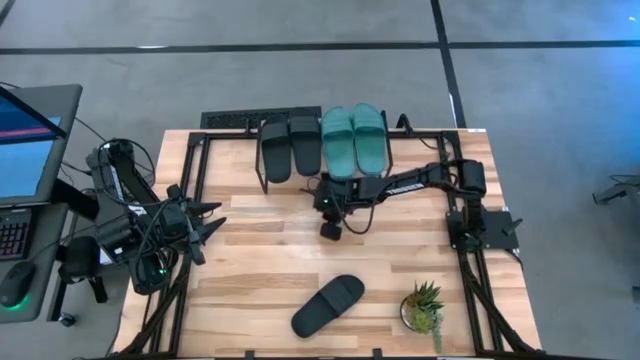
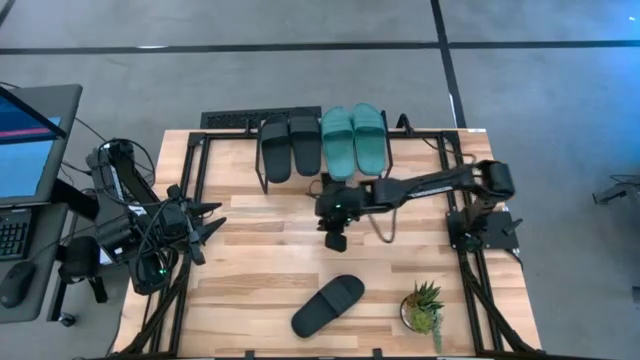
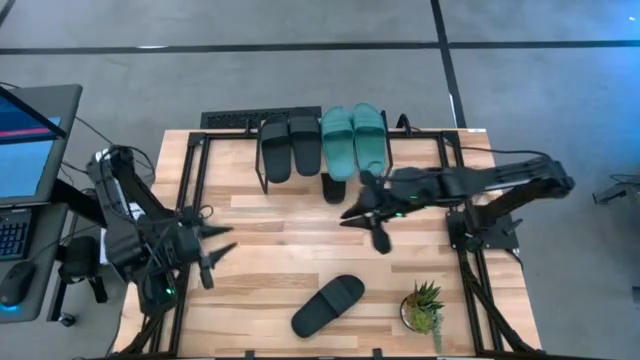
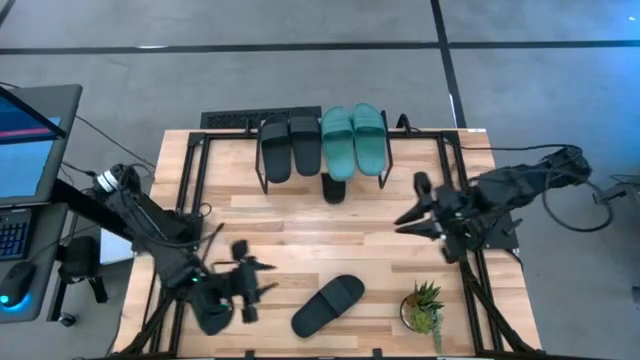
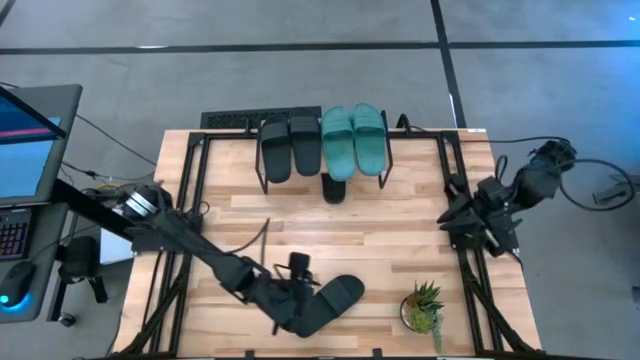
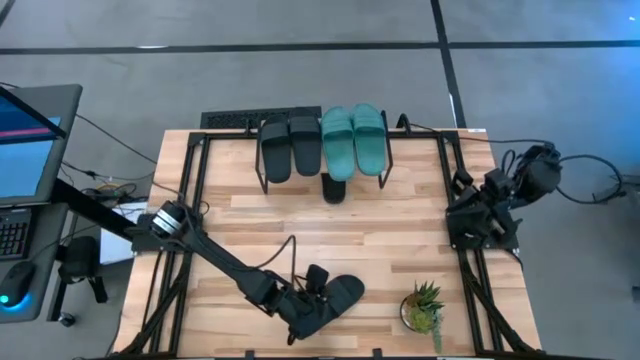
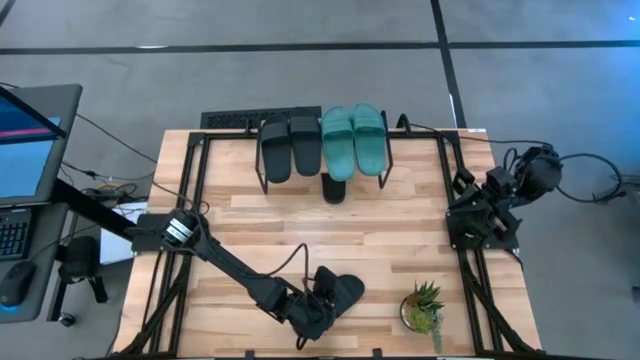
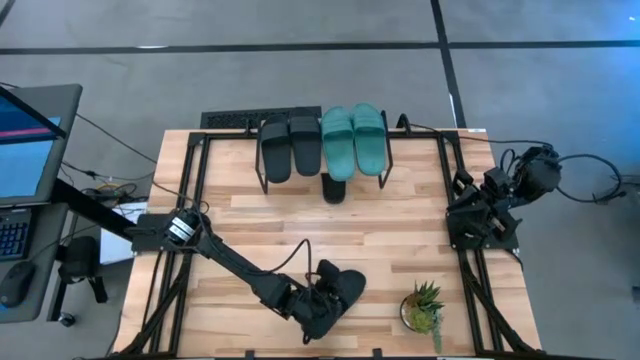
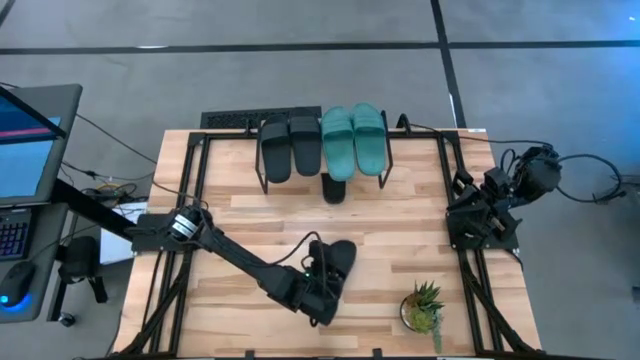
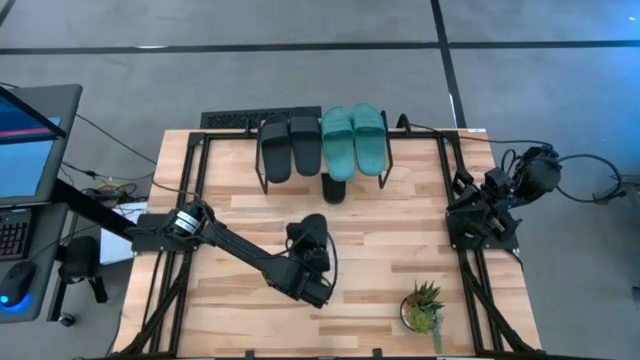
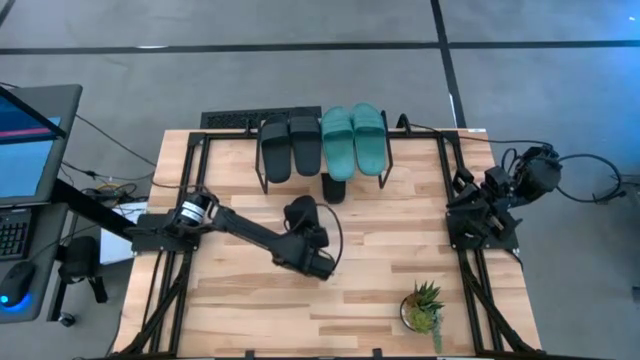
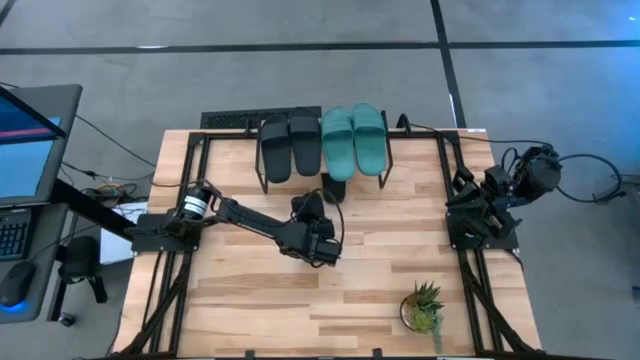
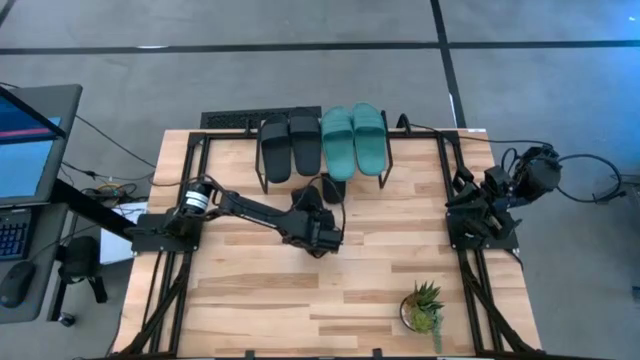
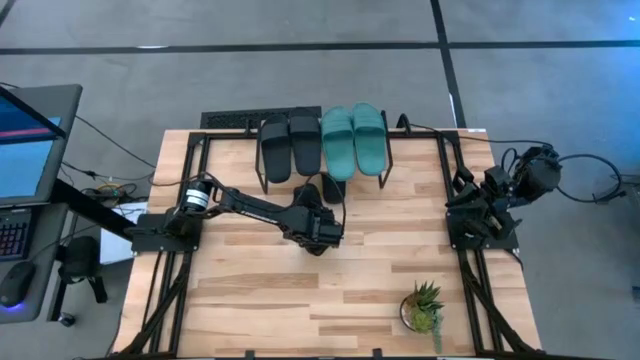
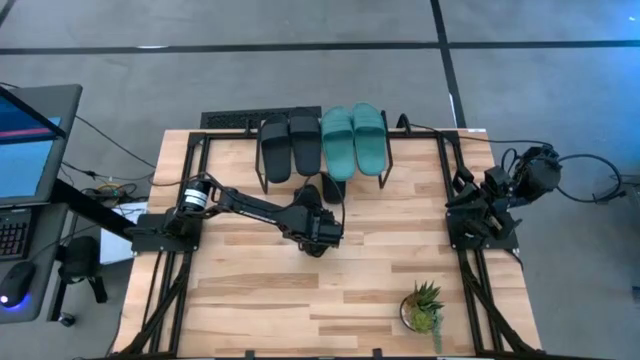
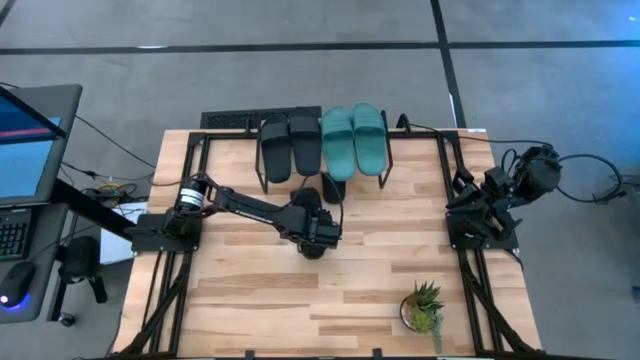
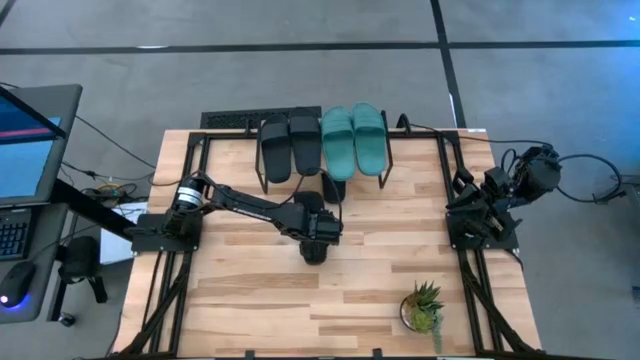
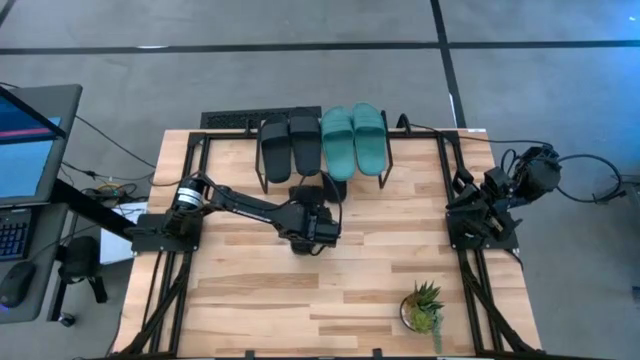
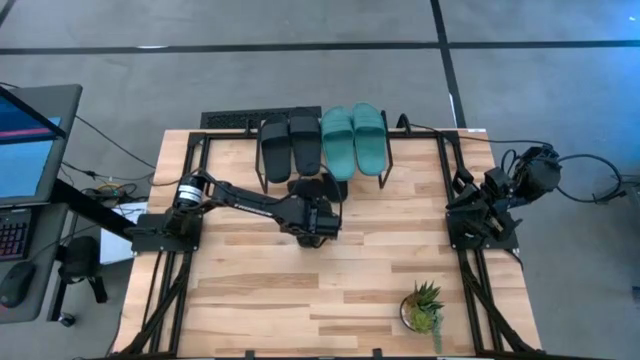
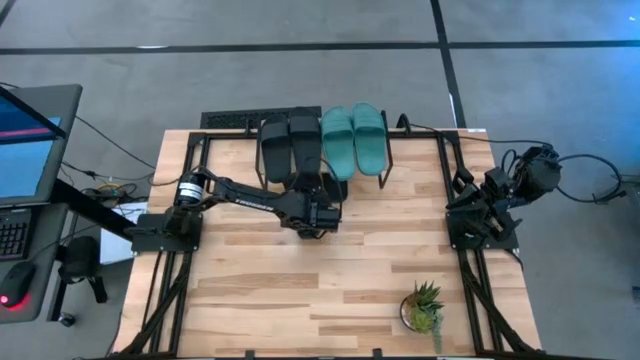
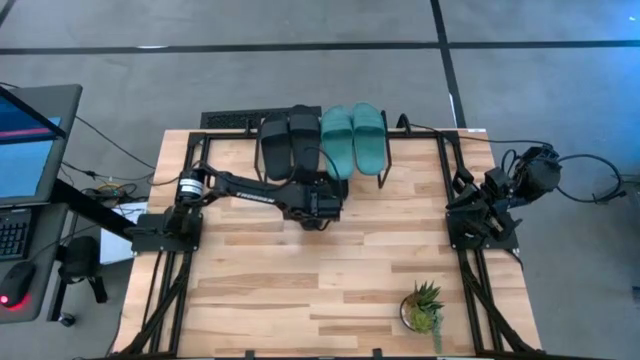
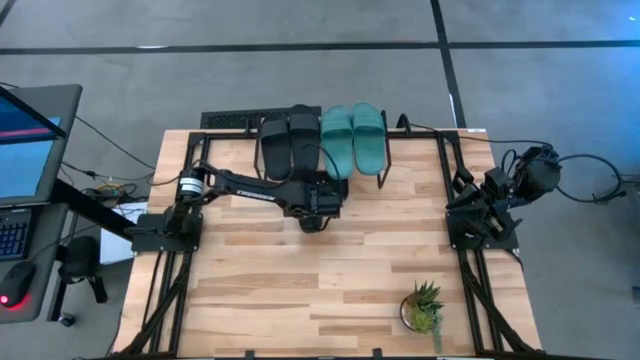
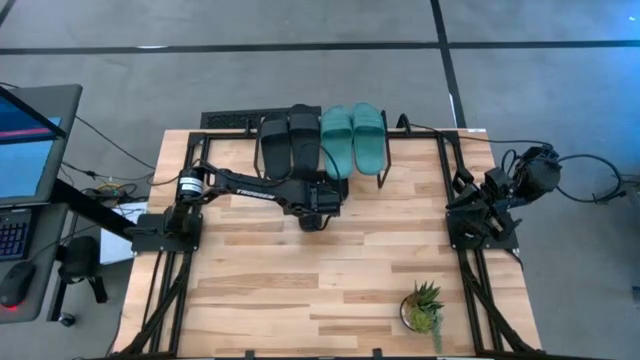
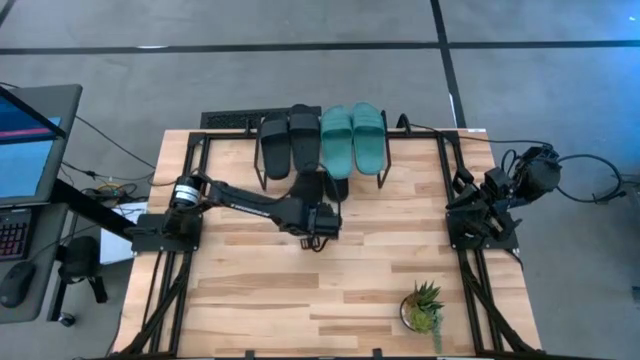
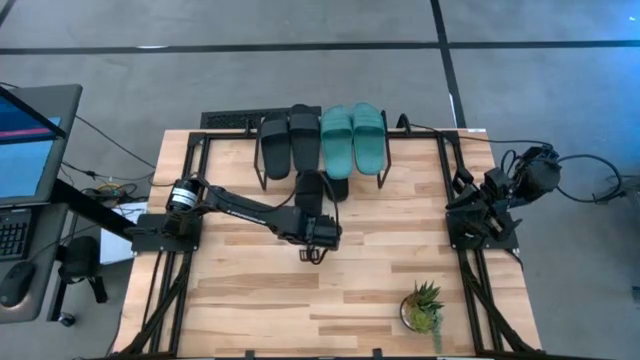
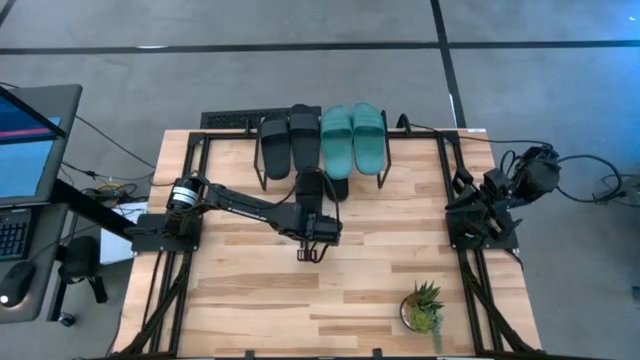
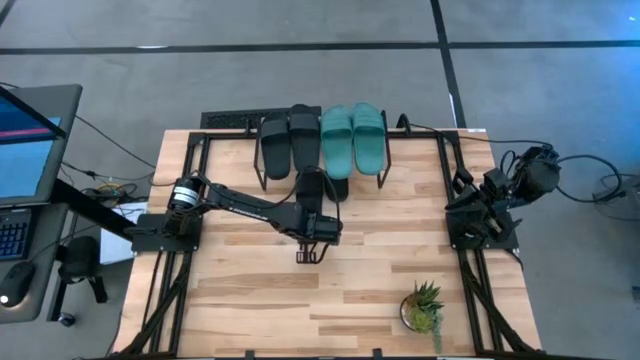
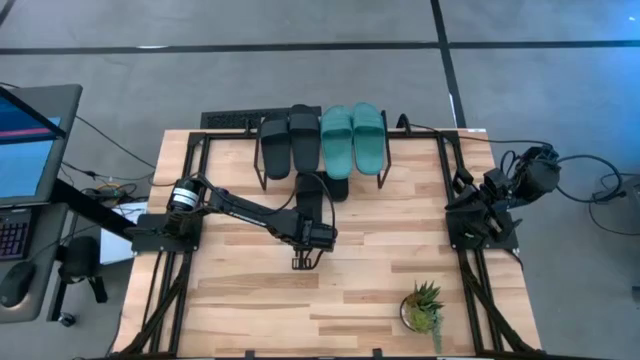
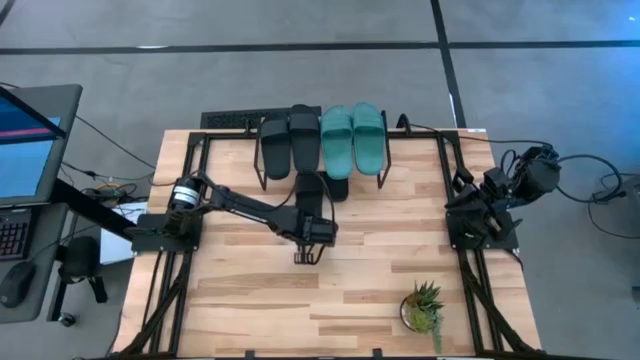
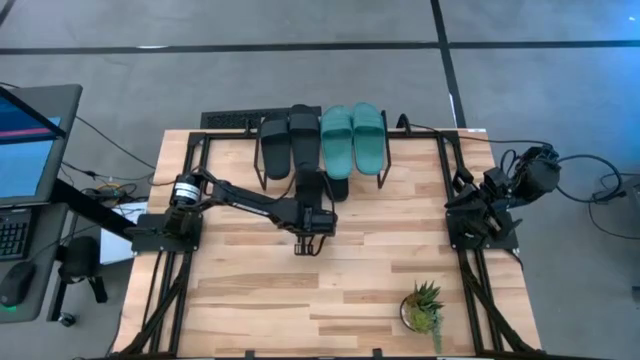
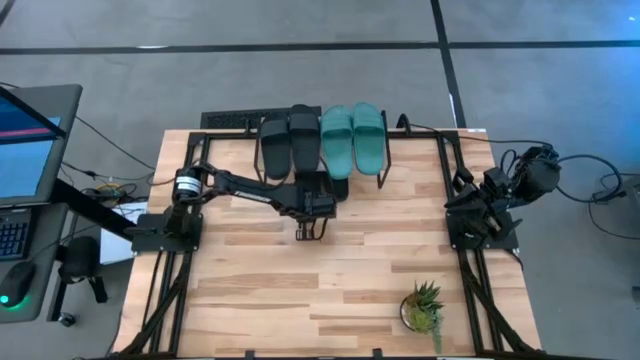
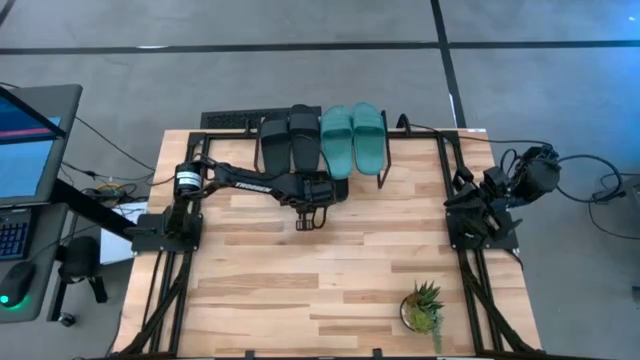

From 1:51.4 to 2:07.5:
Task: Pick and place slides into the shelf
Put the black slipper under the shelf

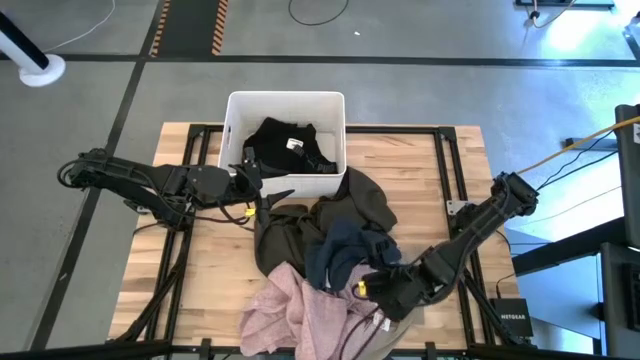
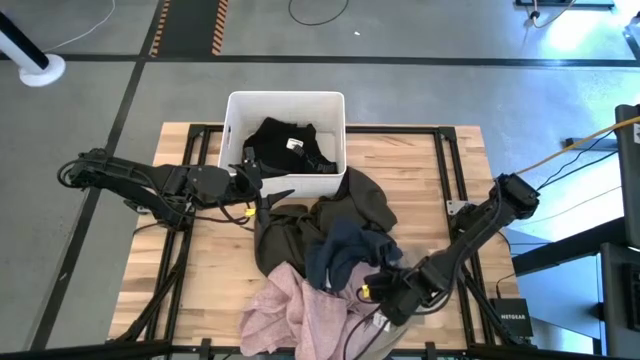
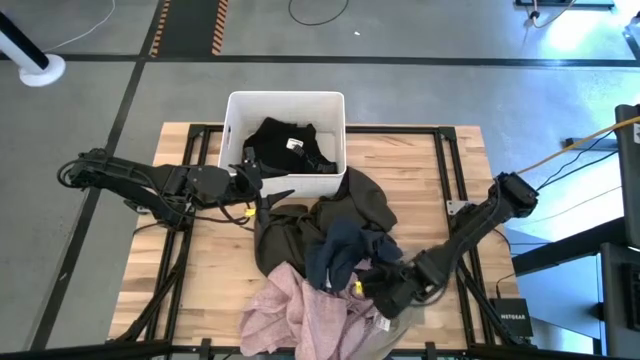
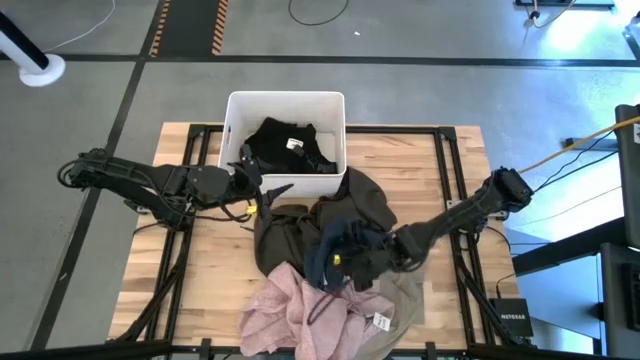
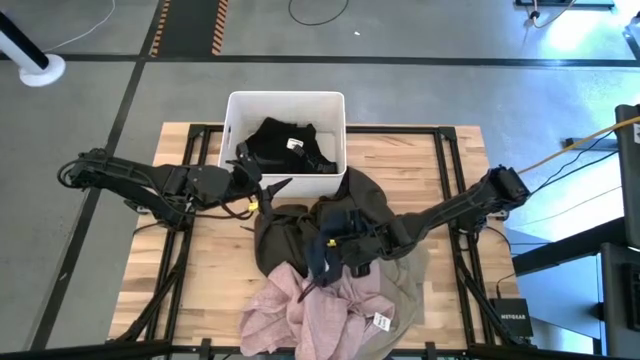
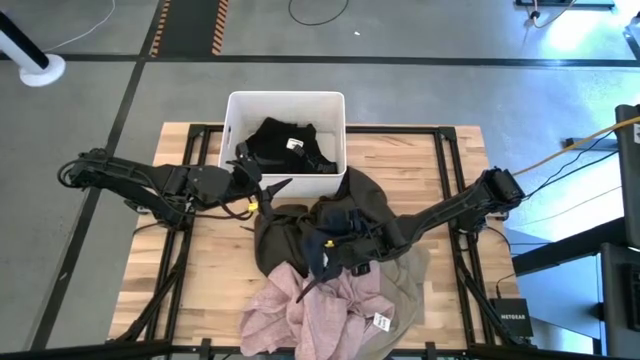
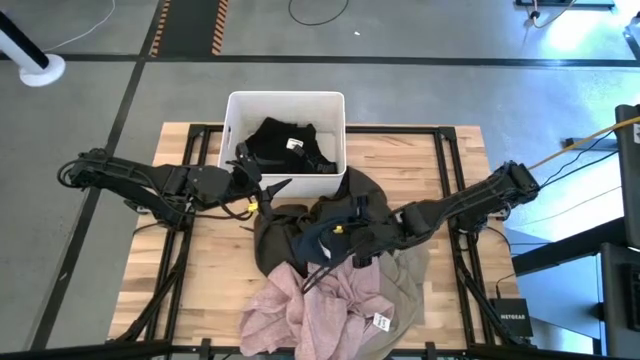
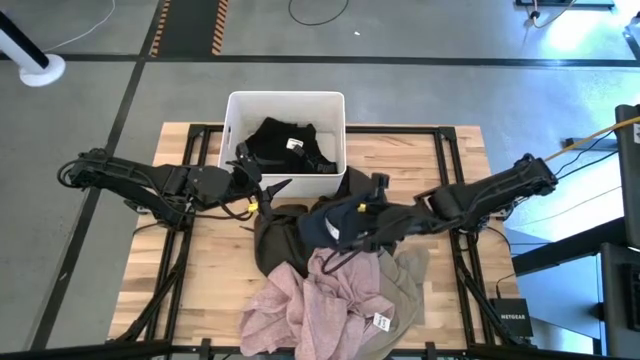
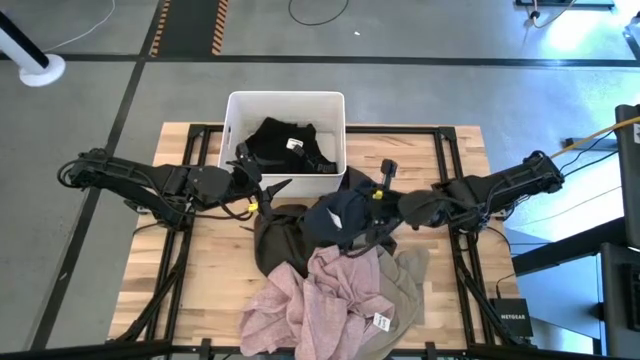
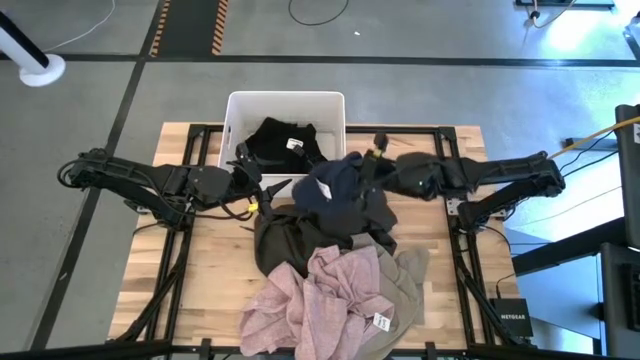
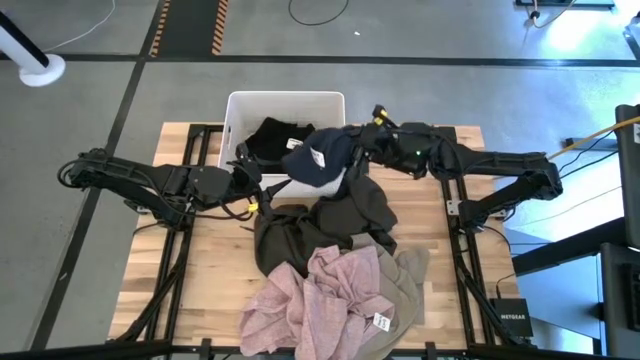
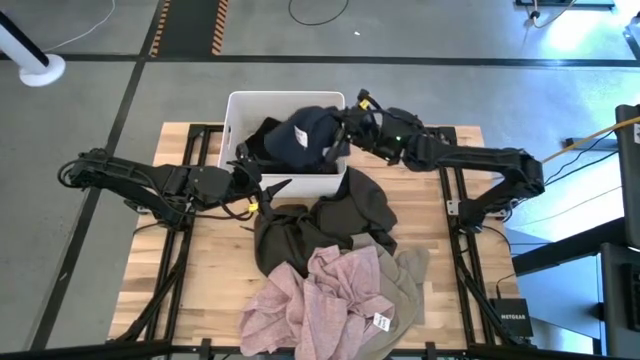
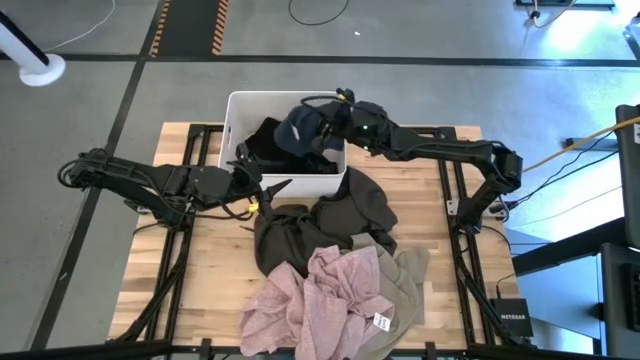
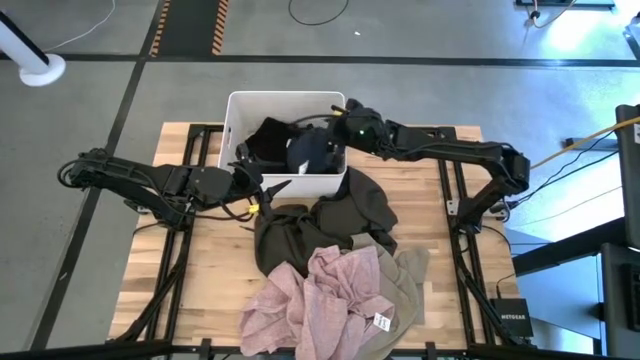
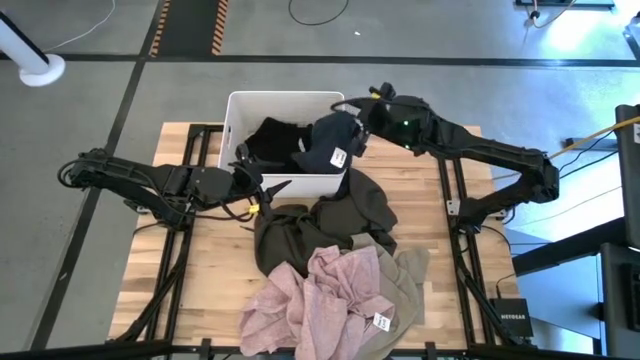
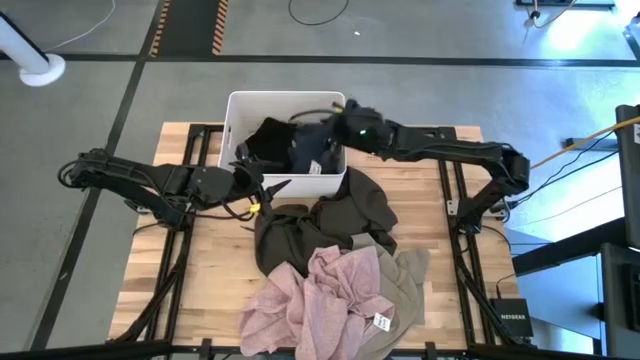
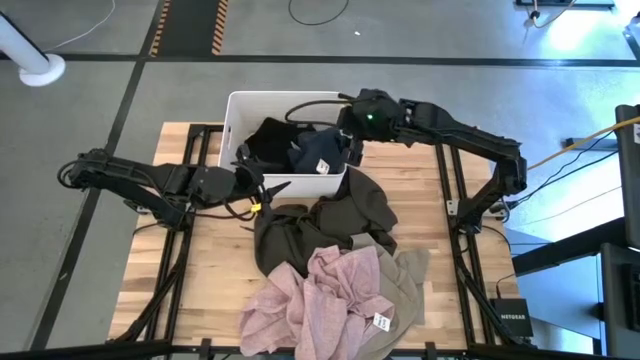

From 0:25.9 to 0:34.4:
Task: Sort clothes
Put the blue shorts into the white laundry bin
